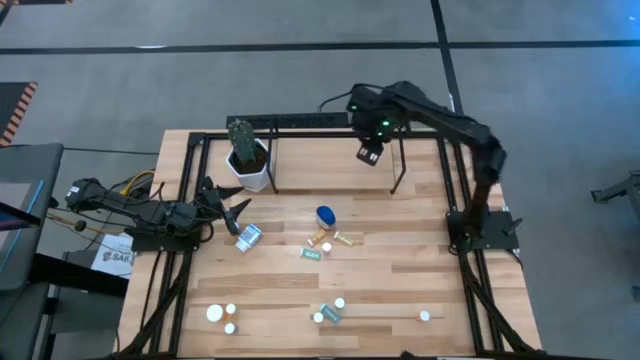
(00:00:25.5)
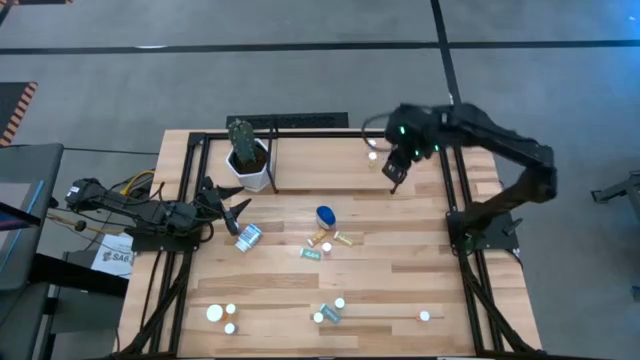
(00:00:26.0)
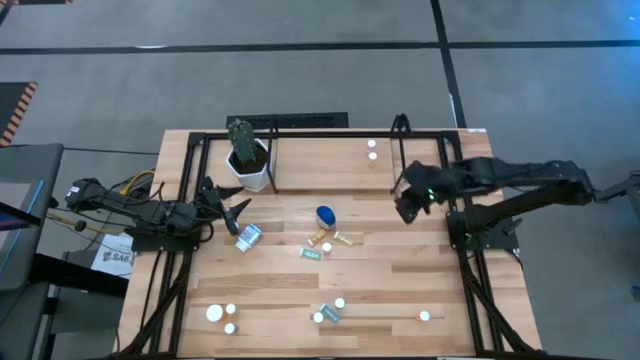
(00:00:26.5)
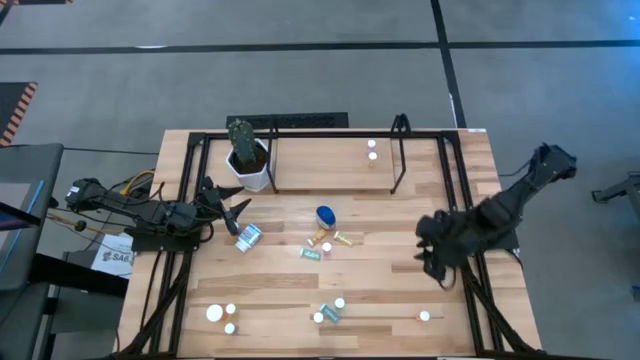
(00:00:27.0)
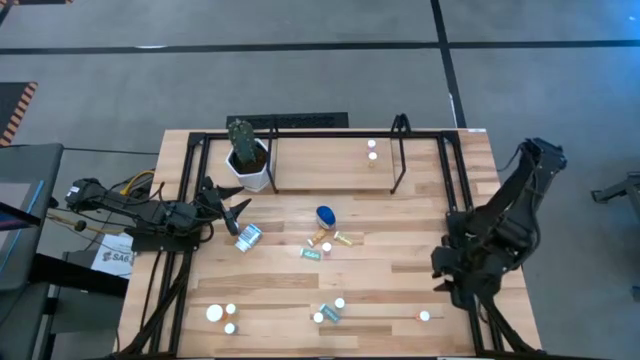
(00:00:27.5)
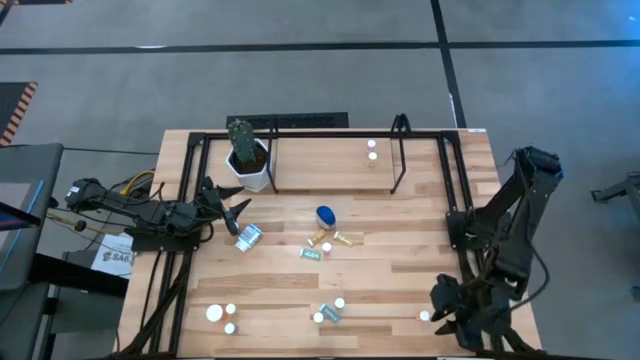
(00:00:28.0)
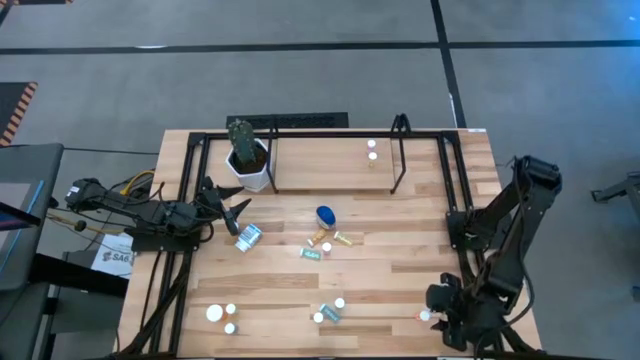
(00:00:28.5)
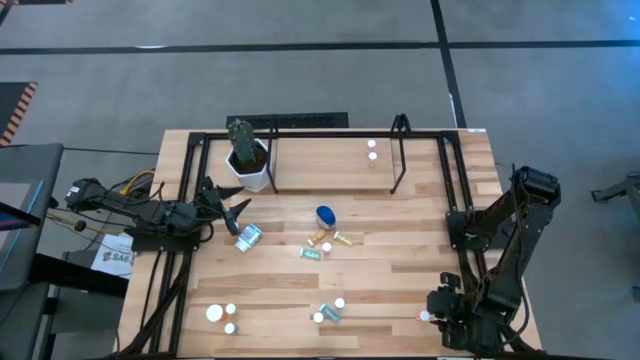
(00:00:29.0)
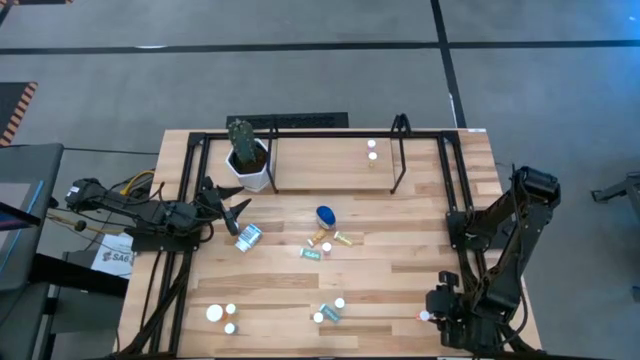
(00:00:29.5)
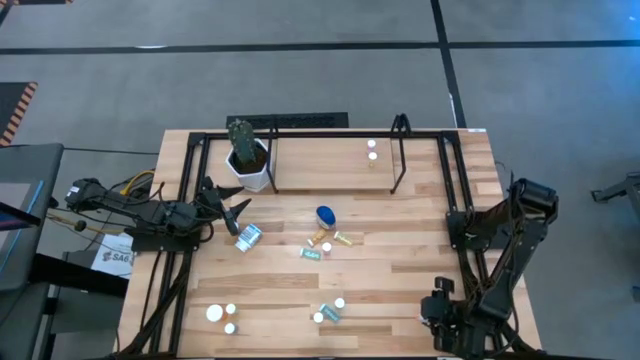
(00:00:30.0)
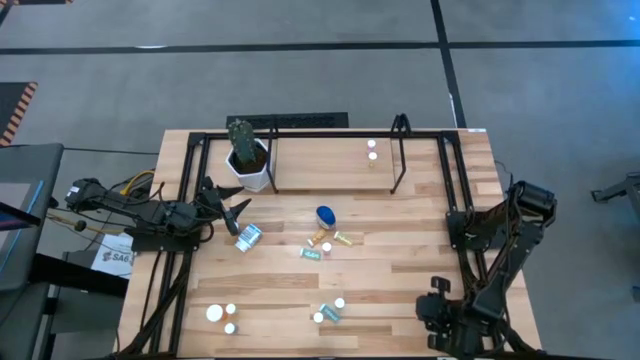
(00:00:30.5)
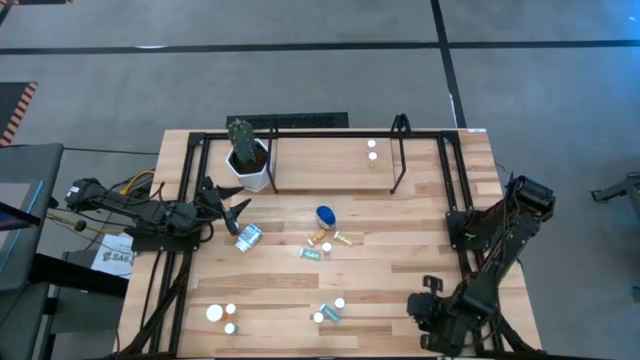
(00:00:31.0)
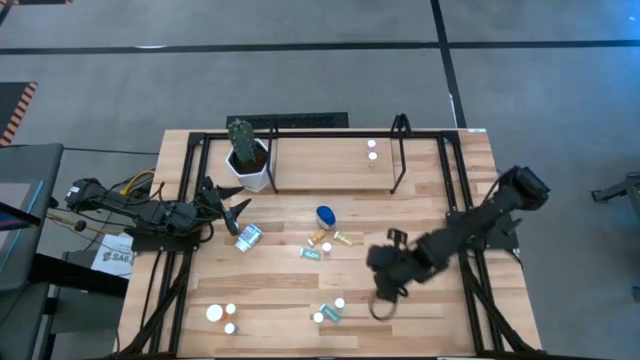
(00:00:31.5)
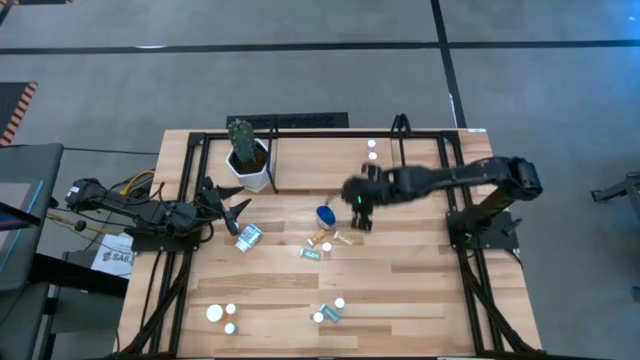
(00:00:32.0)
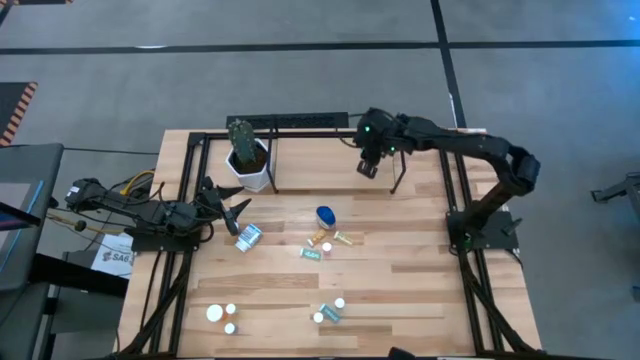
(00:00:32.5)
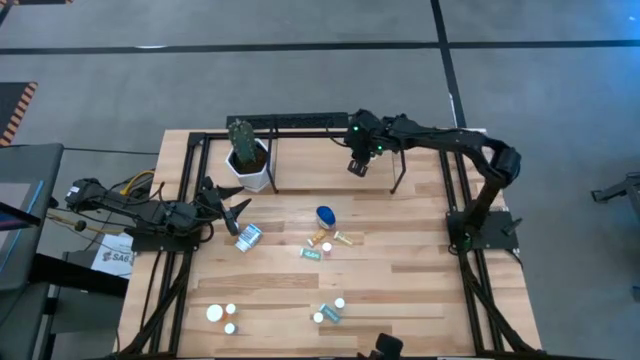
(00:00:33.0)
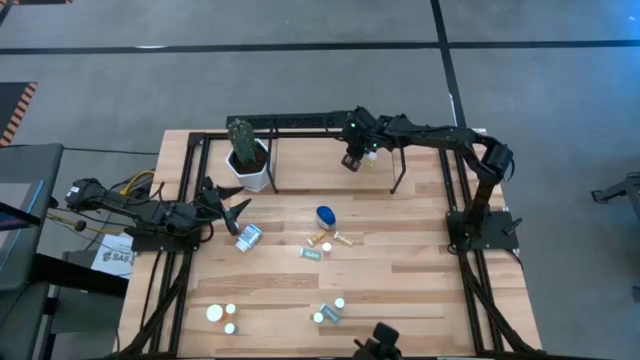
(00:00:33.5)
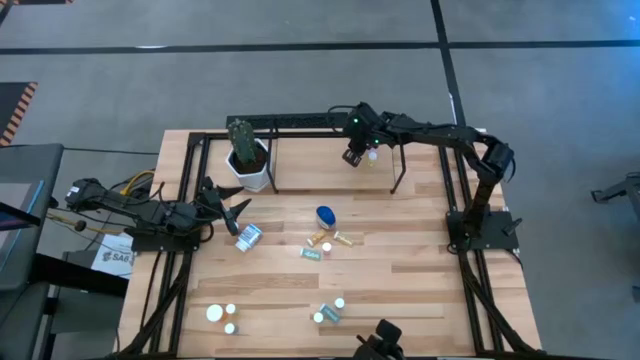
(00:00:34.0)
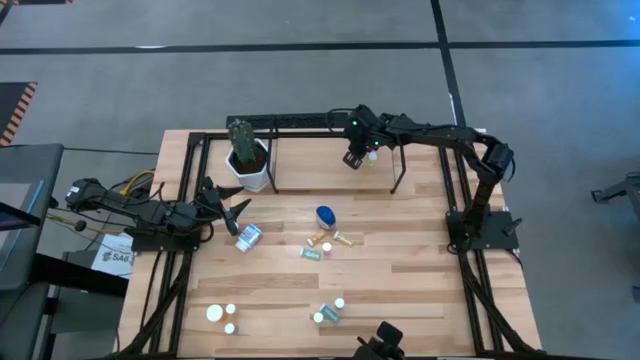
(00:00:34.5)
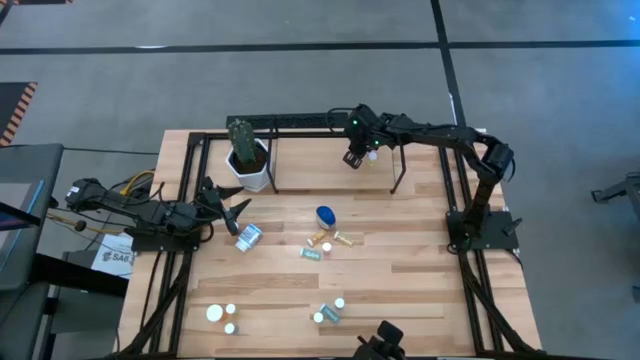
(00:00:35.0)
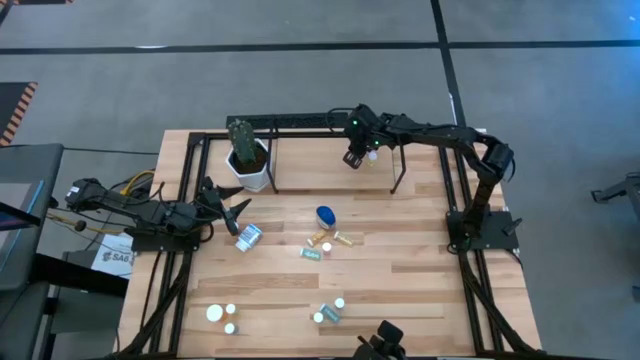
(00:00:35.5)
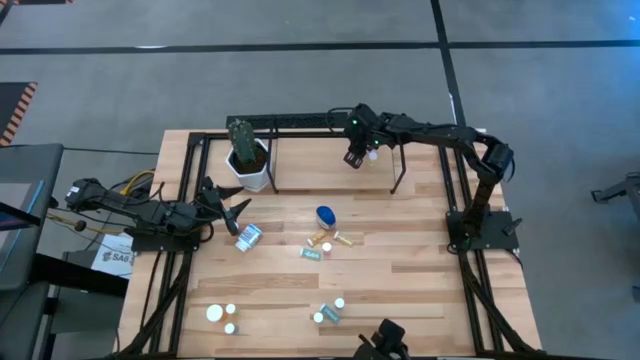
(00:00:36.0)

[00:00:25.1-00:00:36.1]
Task: Pick and place medicine bottles onto shelf by color
Put the small orange pill bottle on the shelf

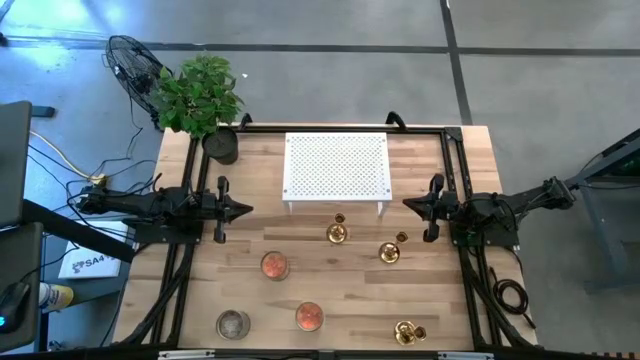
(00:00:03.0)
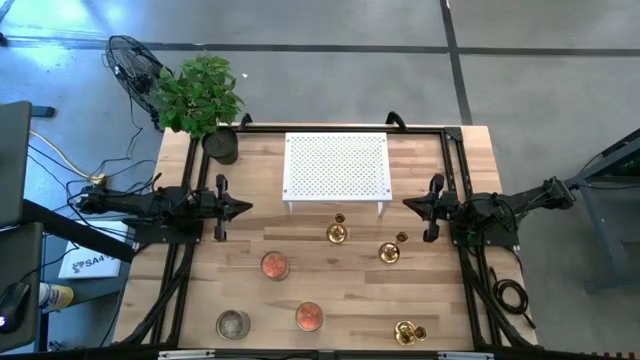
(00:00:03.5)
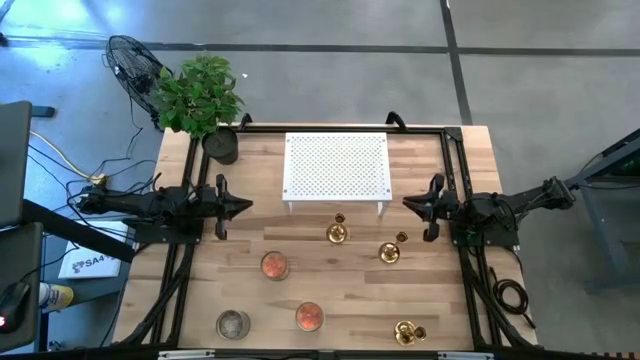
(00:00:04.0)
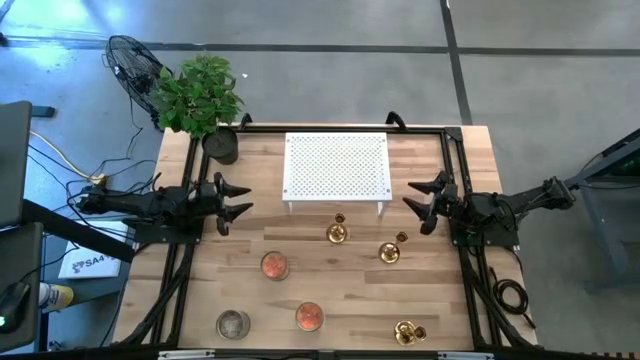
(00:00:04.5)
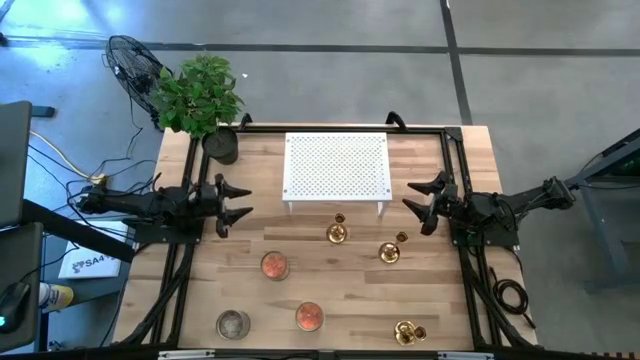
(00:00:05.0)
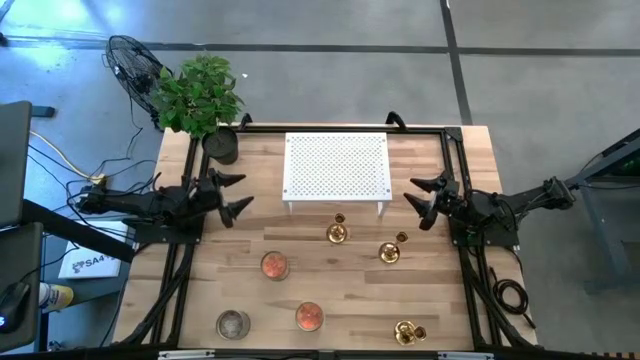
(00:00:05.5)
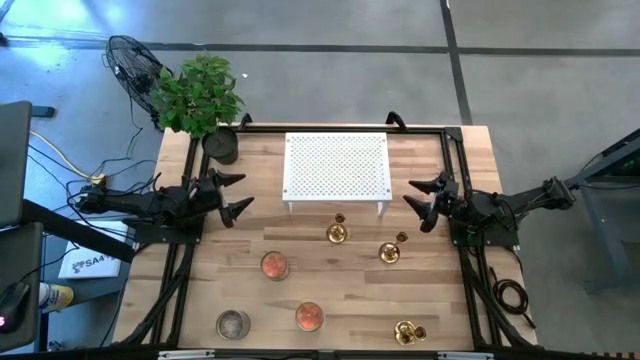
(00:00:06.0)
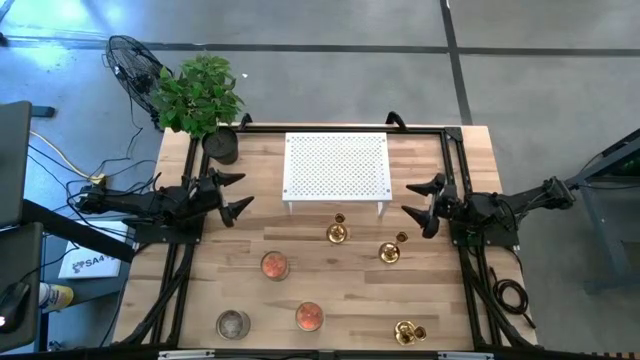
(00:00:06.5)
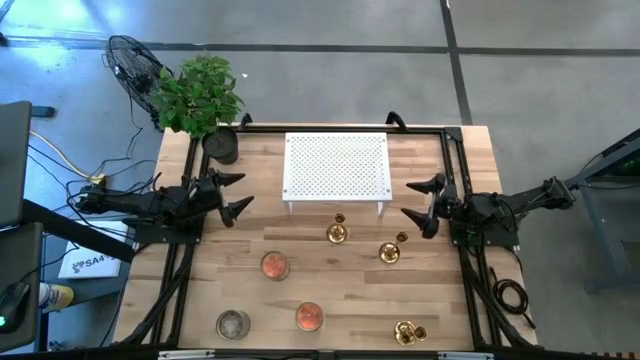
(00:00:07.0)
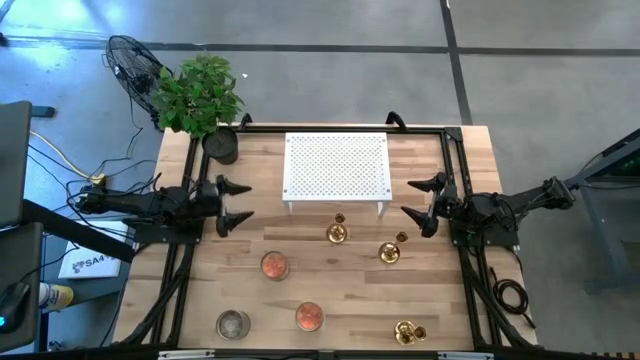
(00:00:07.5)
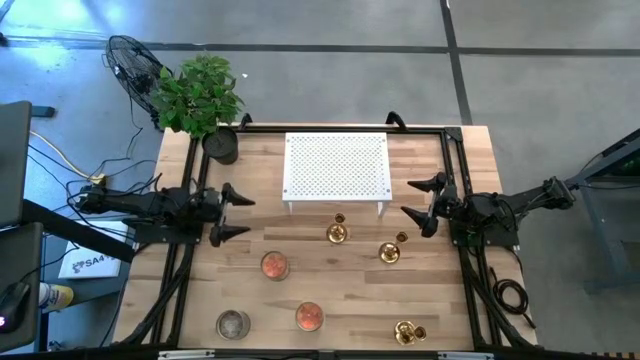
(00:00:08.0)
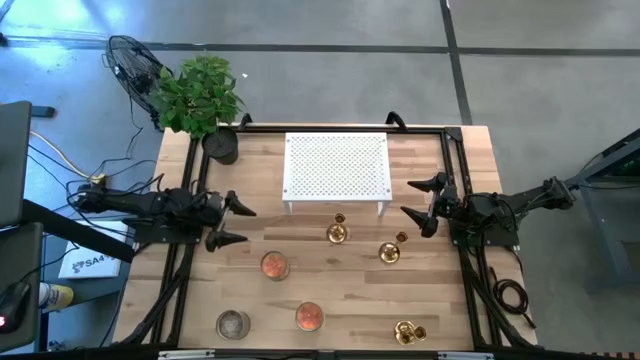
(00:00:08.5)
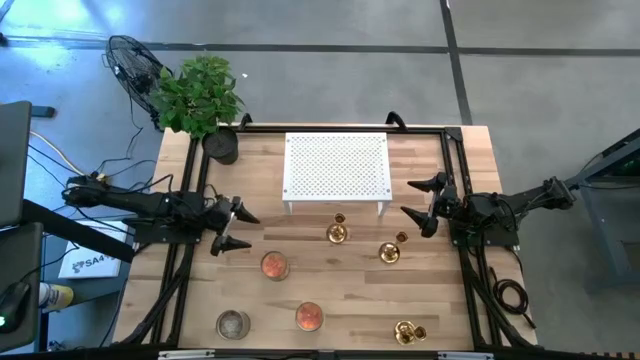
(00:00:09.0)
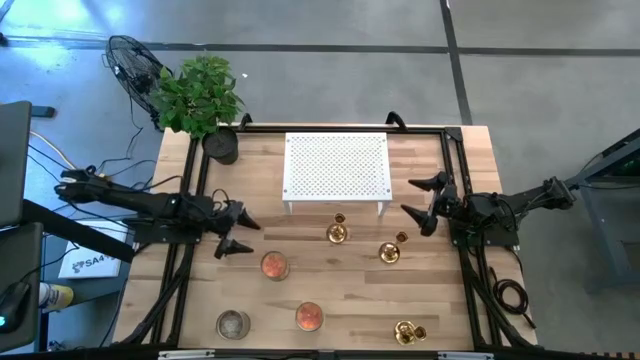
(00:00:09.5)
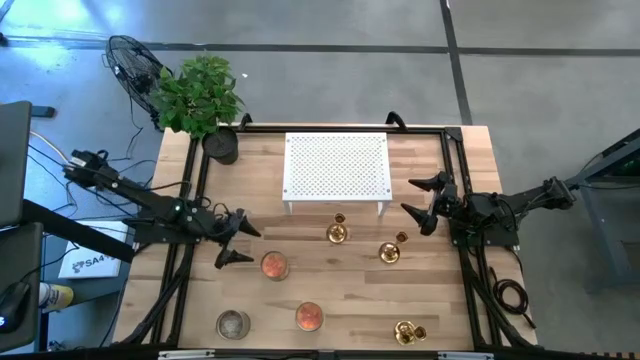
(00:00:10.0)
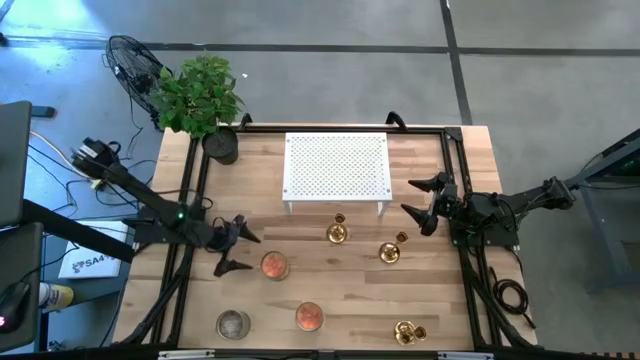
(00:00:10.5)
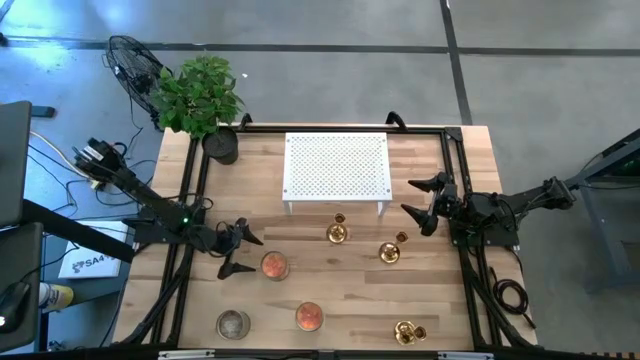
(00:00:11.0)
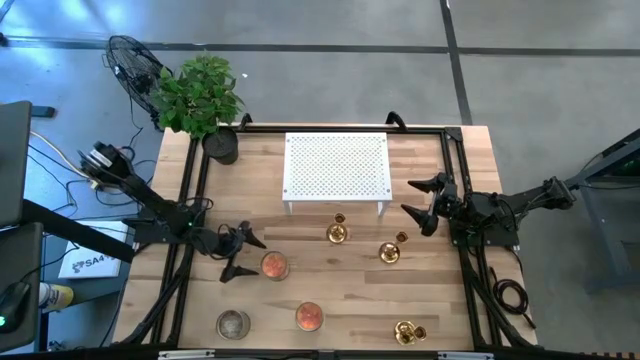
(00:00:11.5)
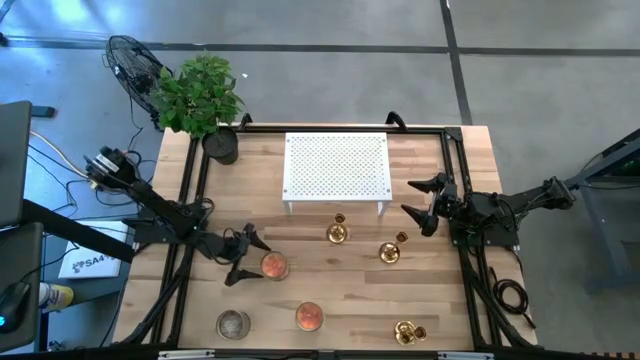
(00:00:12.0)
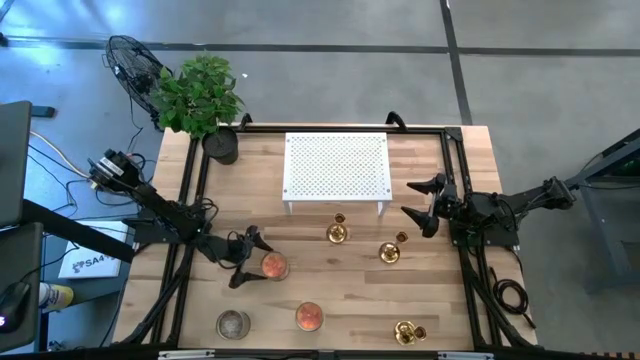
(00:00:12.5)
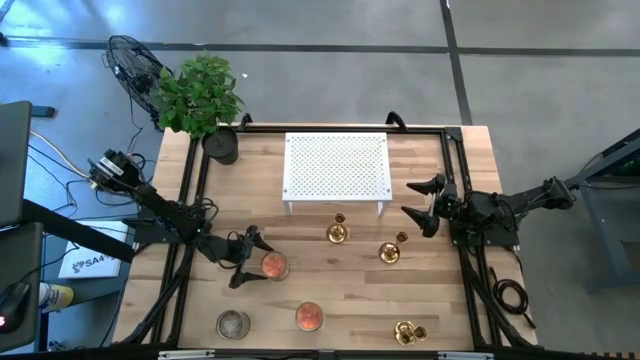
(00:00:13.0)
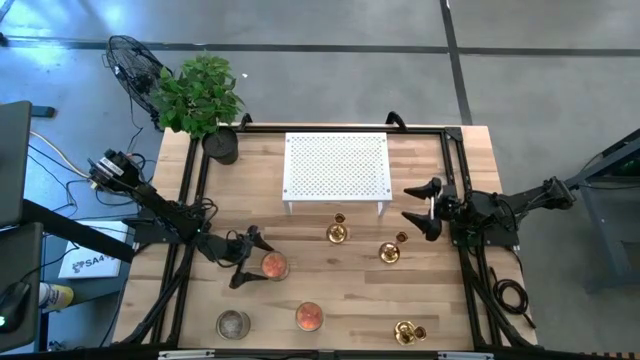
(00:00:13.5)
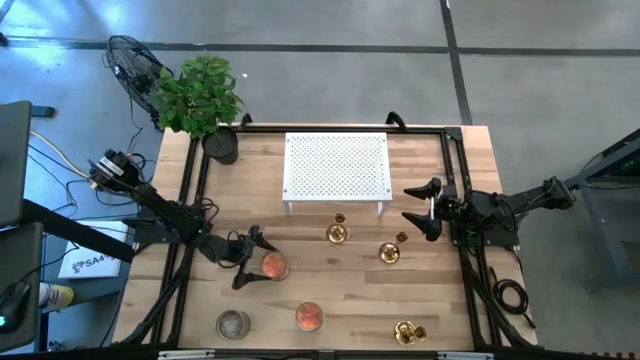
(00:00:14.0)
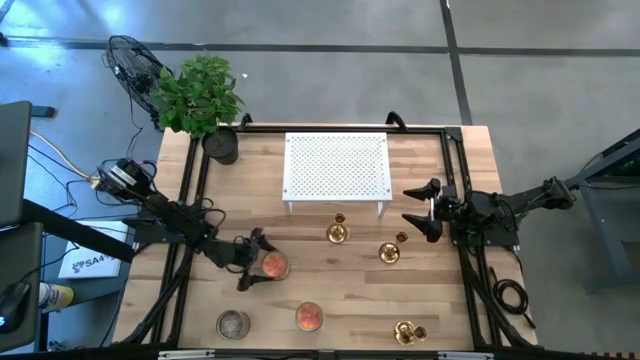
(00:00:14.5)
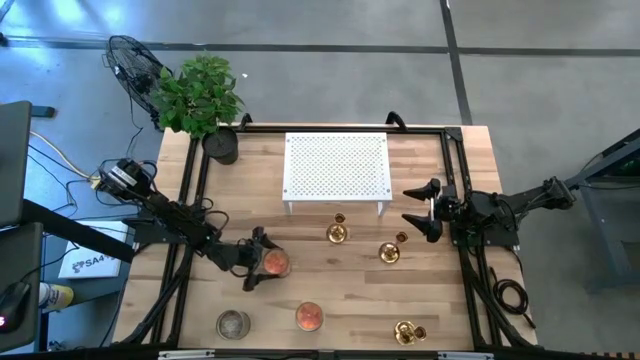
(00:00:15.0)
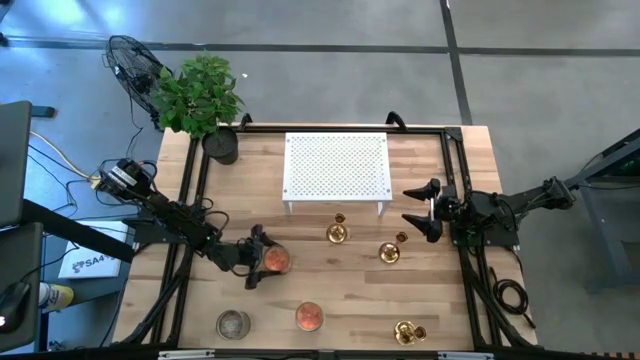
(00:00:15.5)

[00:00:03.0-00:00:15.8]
Task: Pick & Place candle stick holders
Put the fruits and the vegetables in the bin
